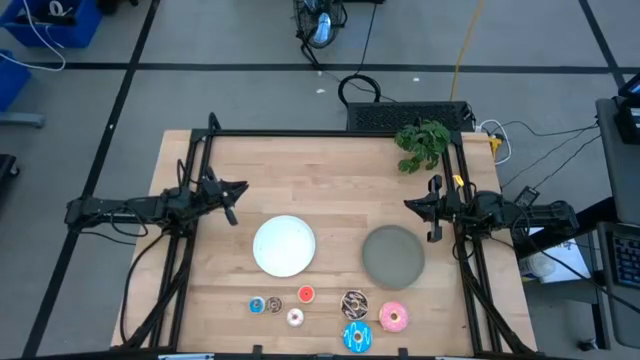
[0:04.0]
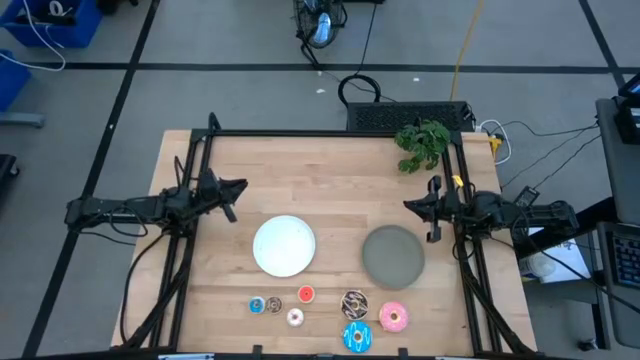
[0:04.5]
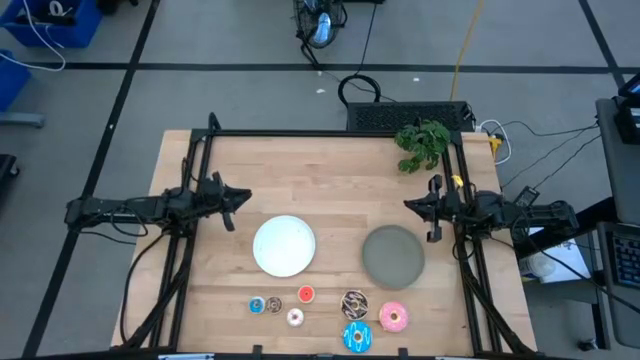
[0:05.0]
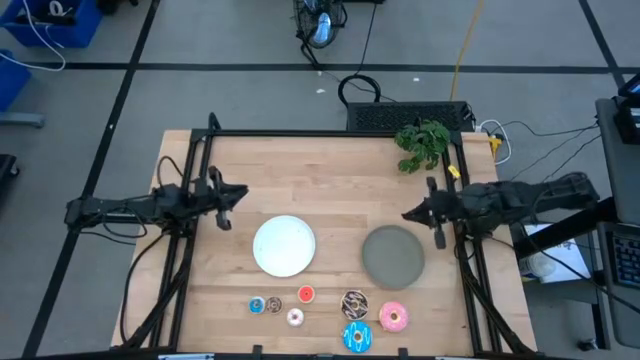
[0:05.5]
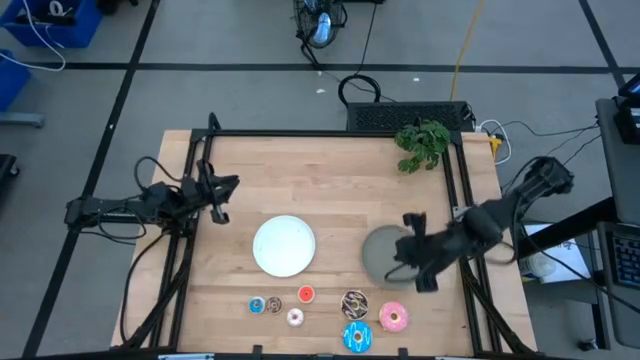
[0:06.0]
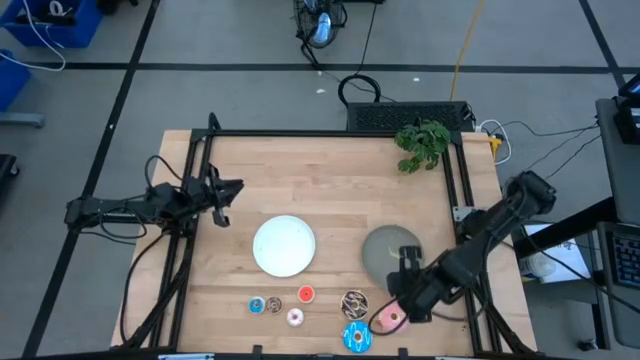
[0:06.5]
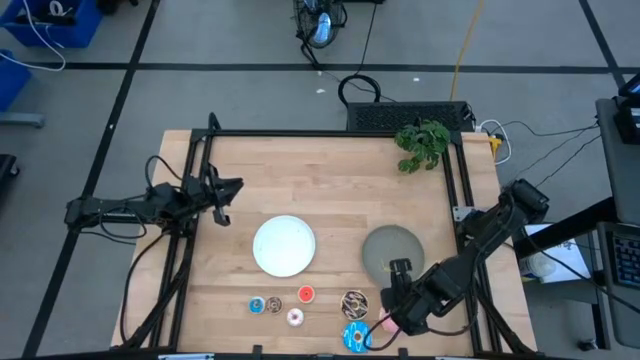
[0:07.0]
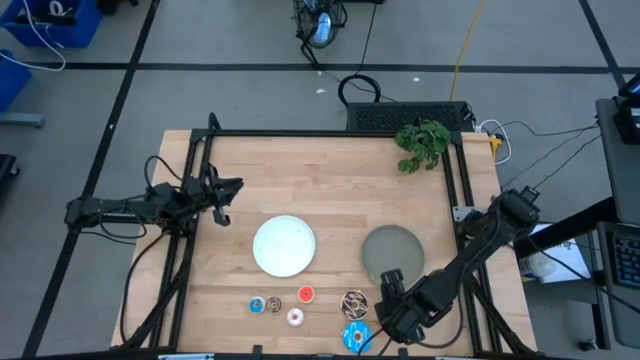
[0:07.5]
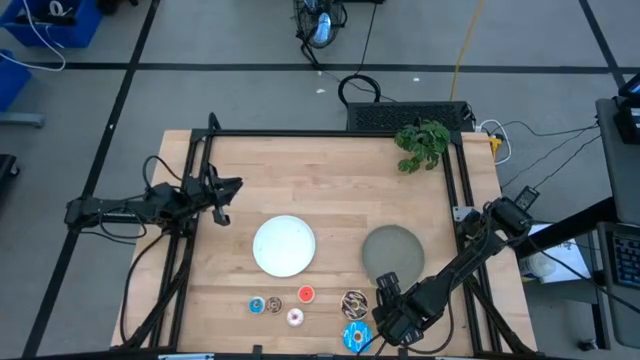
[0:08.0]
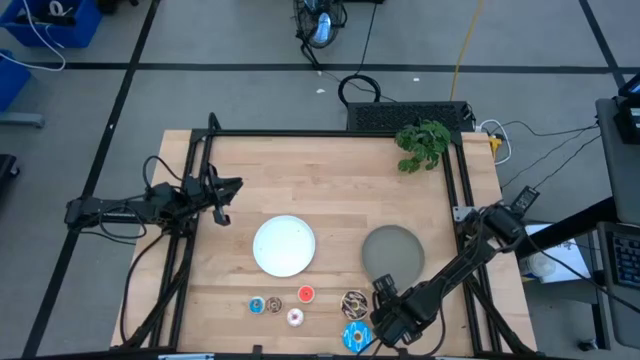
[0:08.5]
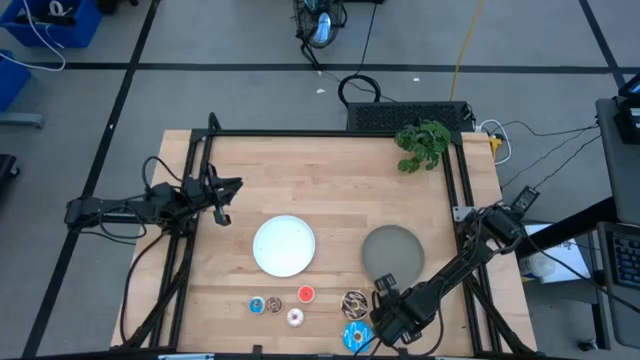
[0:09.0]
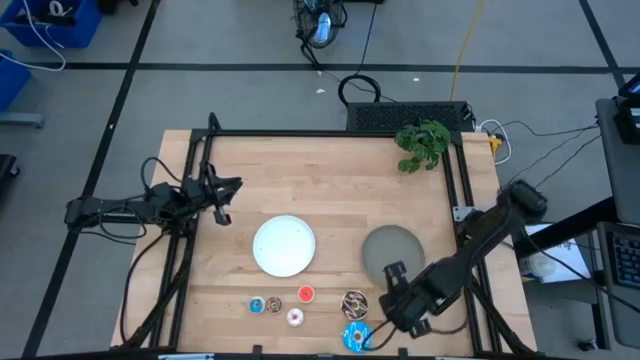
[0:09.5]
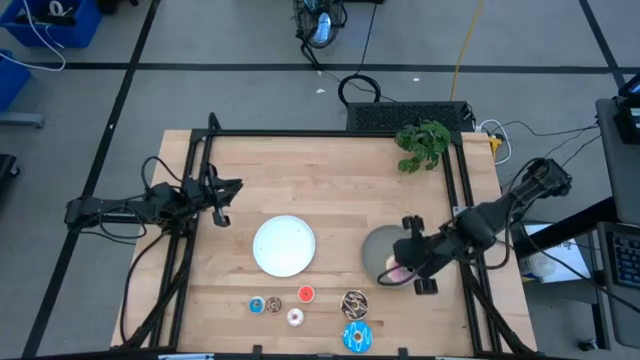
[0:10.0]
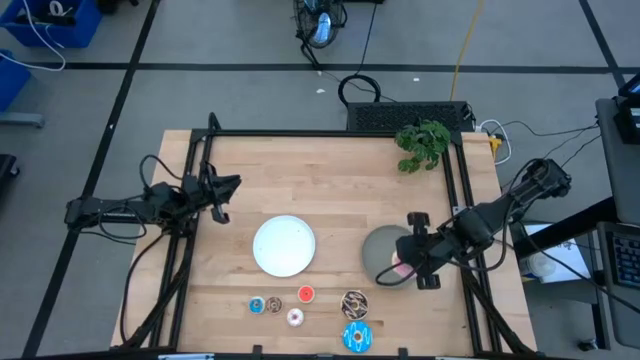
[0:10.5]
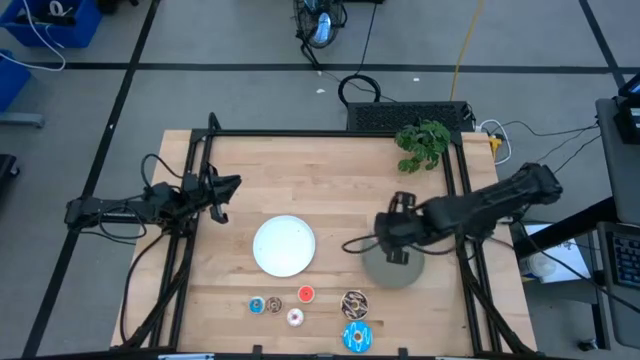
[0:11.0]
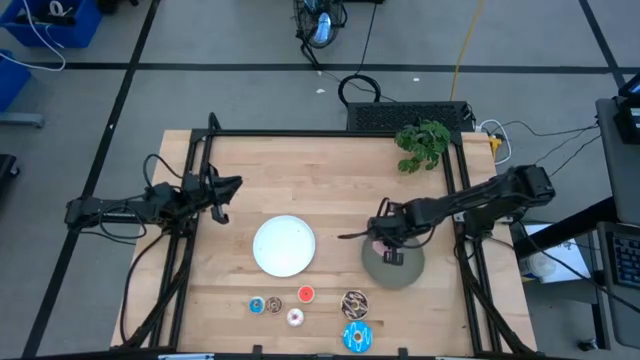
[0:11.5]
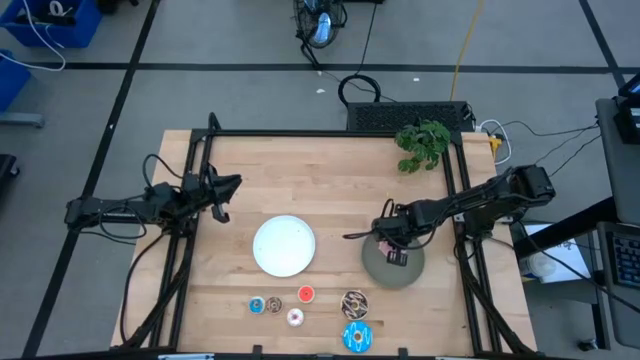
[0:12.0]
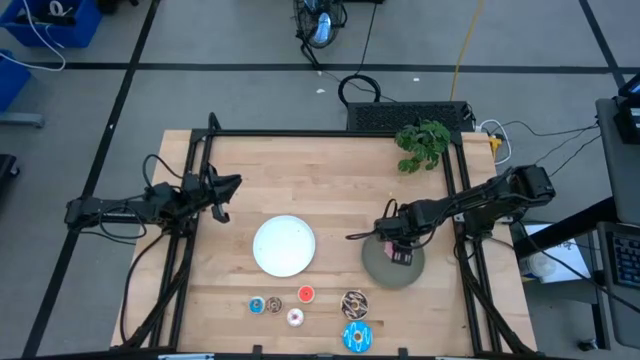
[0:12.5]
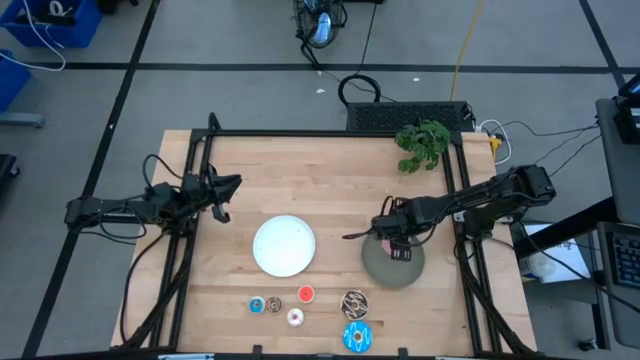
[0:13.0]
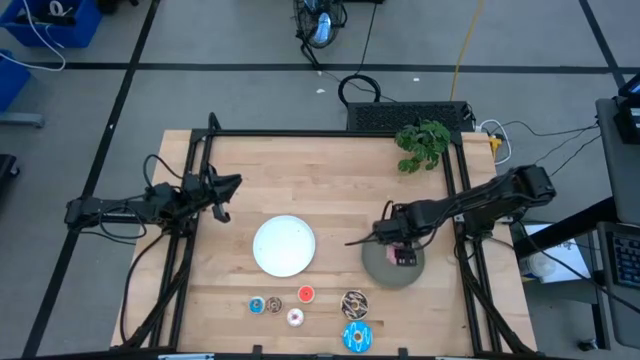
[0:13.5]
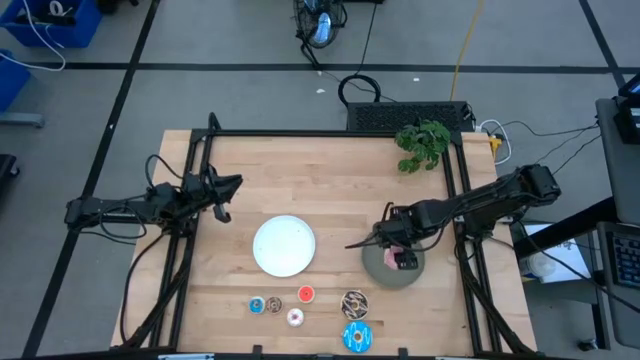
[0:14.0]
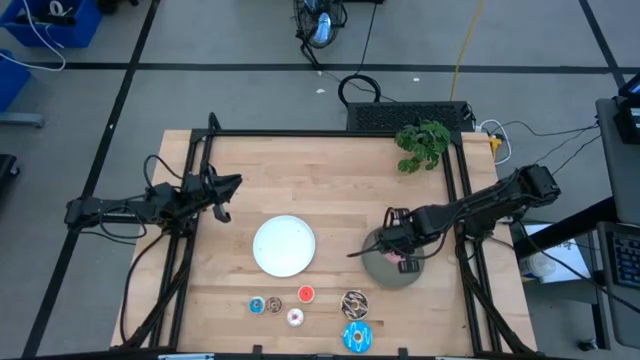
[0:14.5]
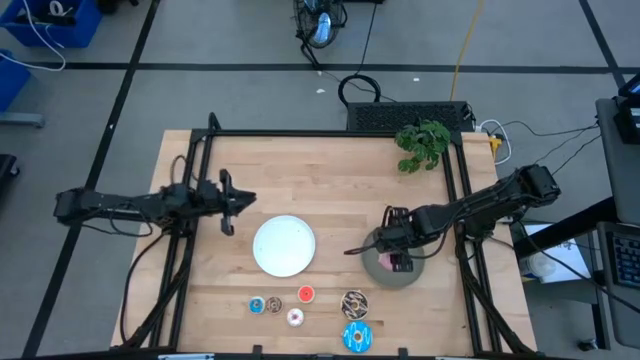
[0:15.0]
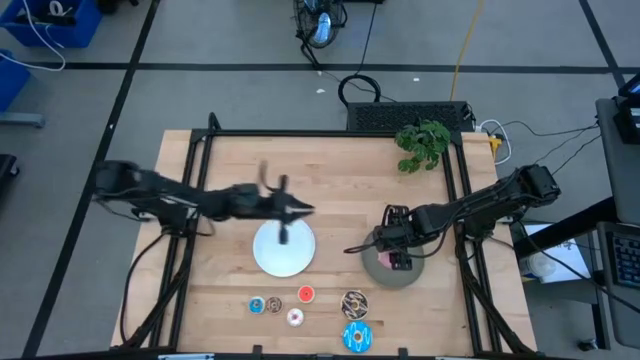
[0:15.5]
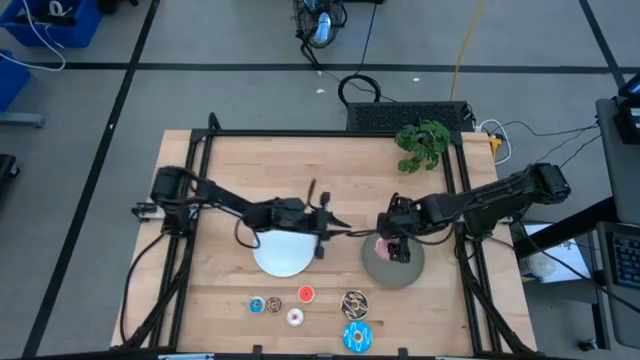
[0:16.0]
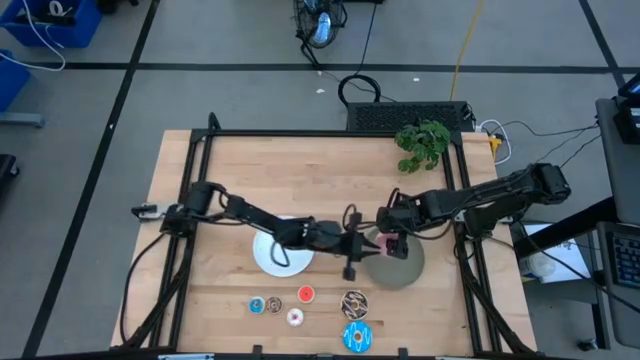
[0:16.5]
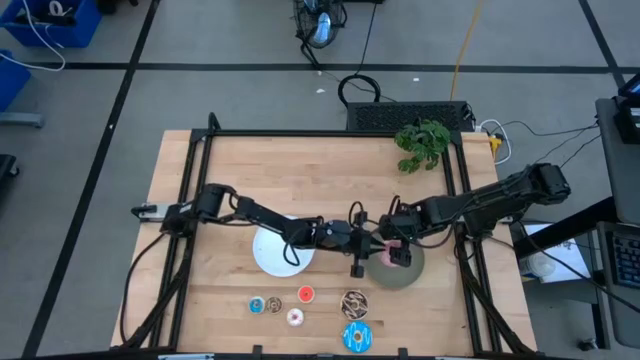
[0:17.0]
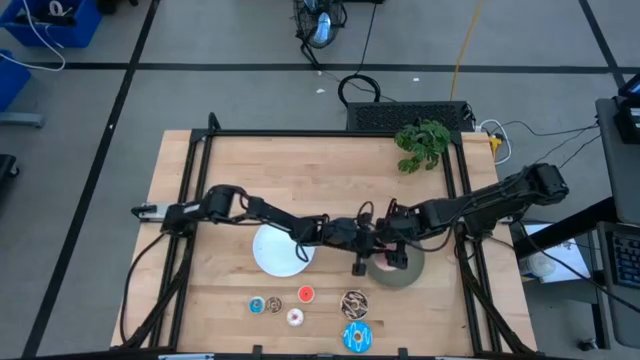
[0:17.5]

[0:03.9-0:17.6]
Task: Pick & Place donuts
Put the large pink donut on the gray plate

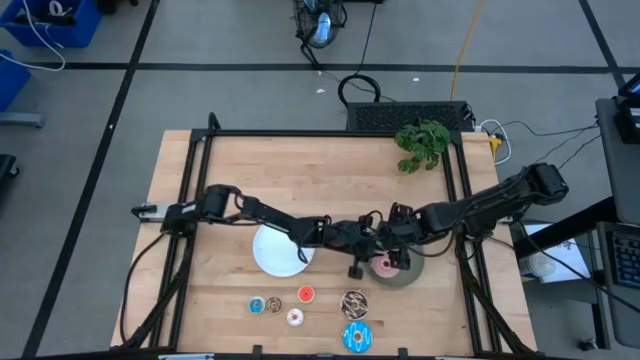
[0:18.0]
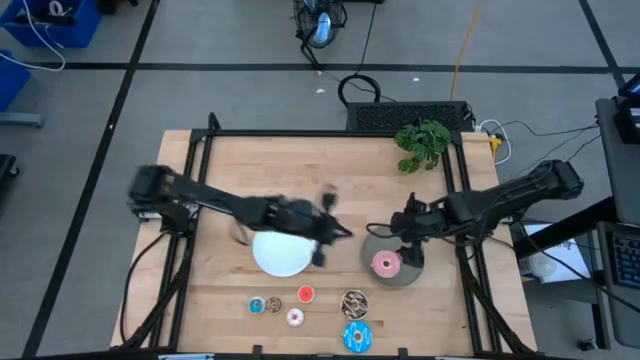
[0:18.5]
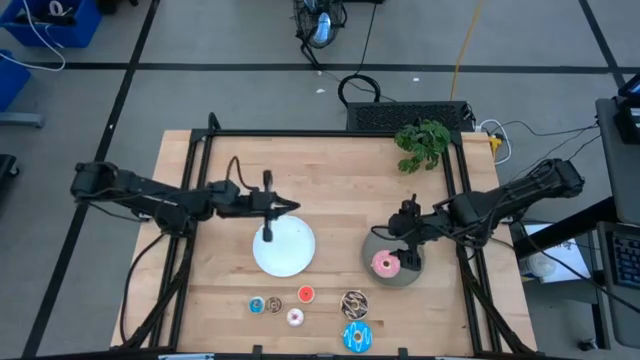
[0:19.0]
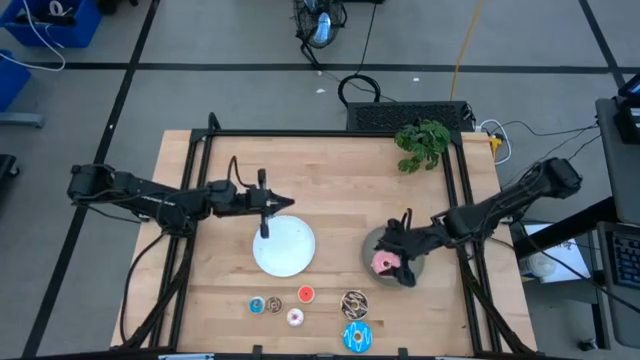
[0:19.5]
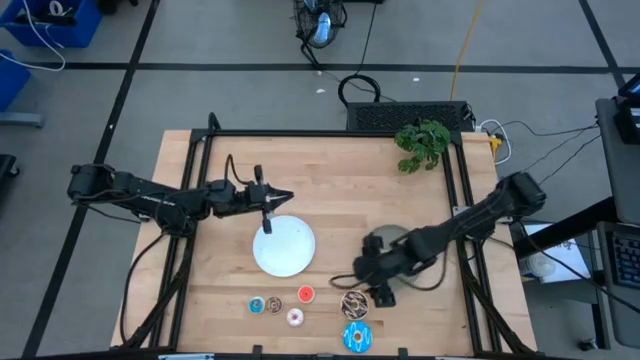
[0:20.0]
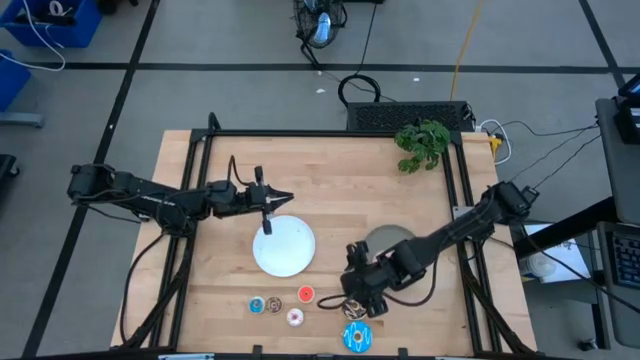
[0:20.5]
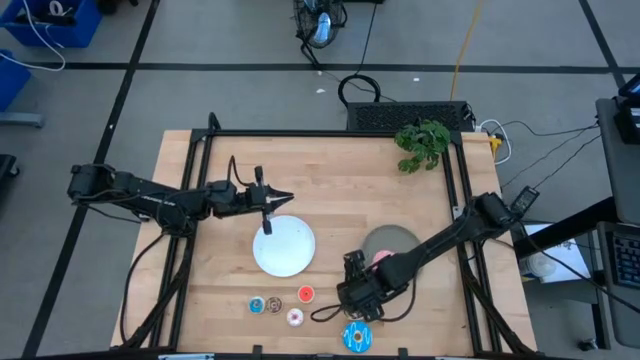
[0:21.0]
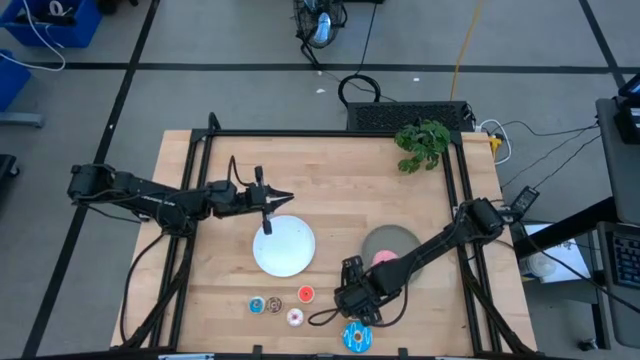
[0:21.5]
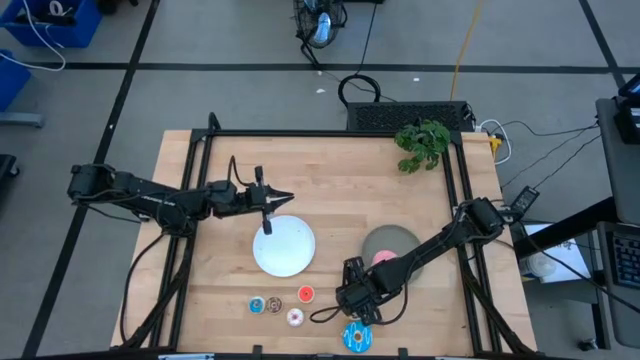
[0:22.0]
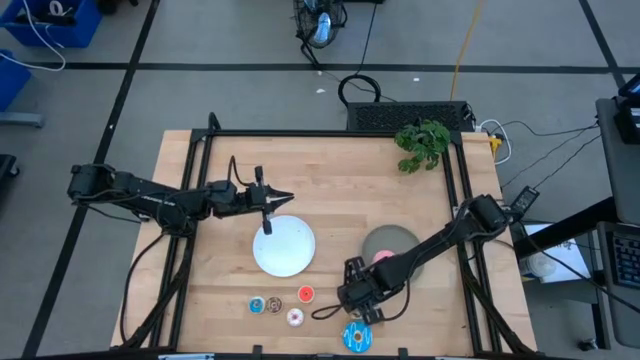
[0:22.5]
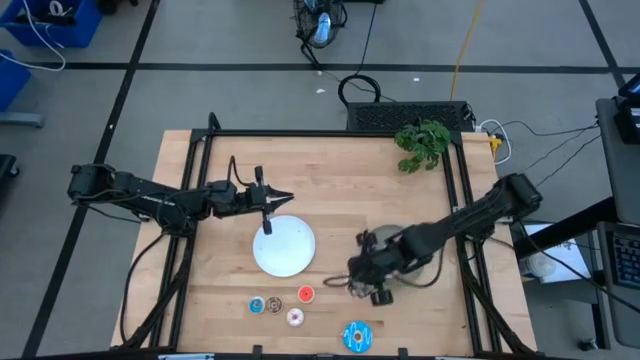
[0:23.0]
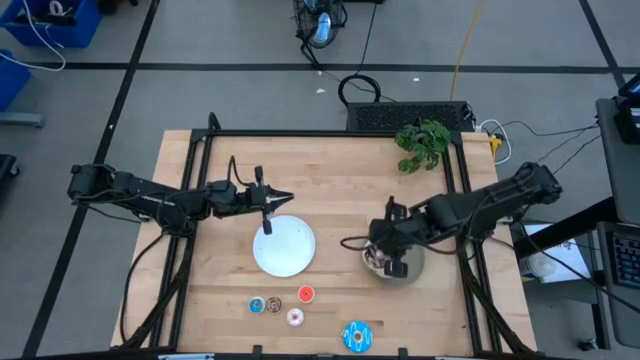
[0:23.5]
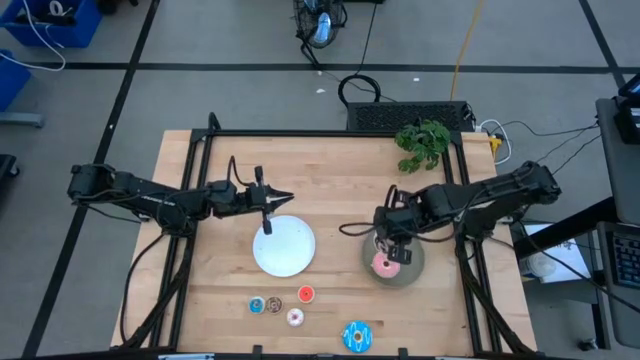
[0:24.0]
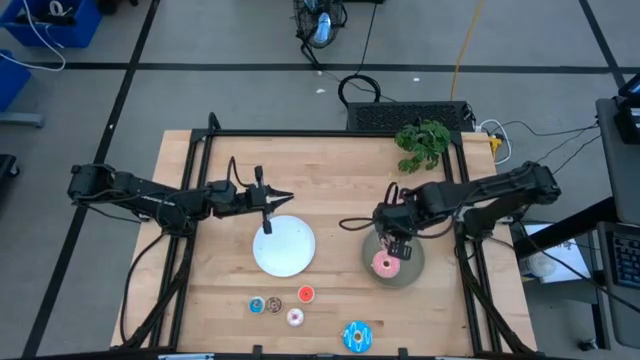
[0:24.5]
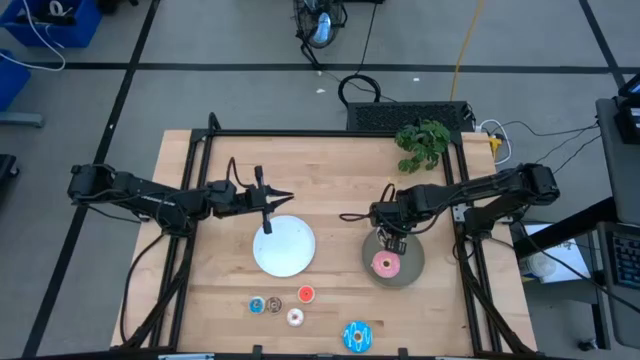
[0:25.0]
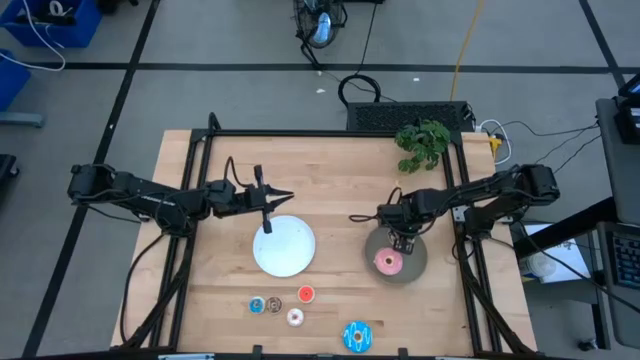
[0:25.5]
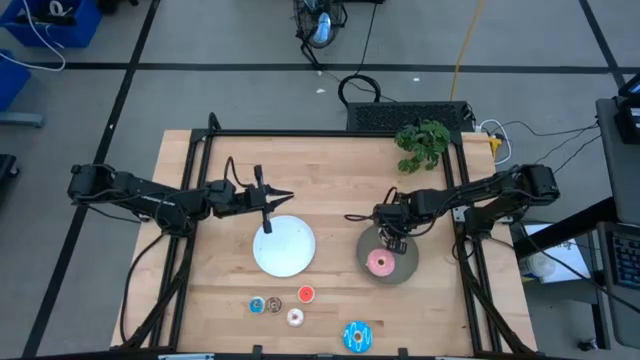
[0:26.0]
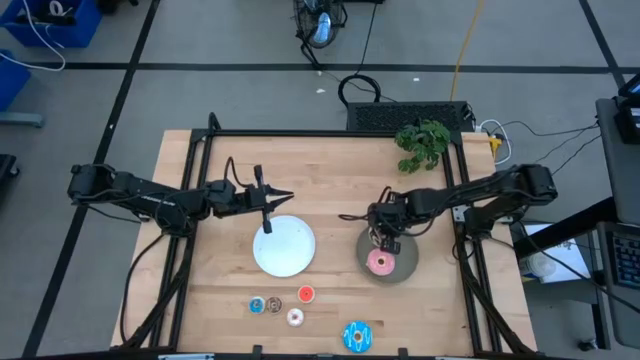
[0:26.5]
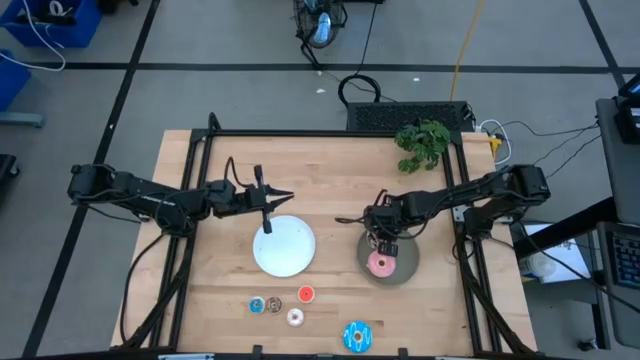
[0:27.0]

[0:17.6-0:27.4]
Put the large black donut on the gray plate
